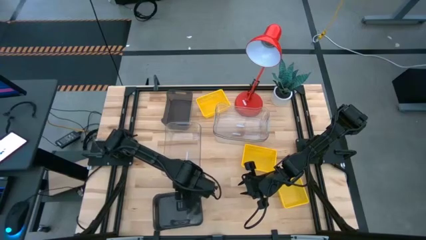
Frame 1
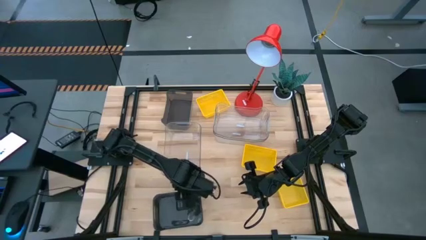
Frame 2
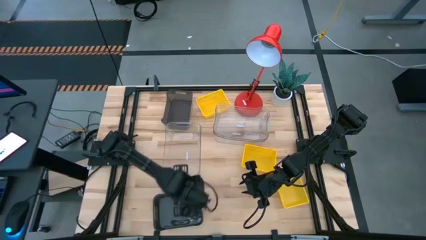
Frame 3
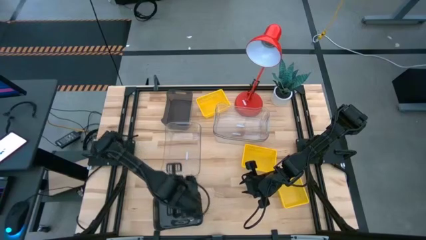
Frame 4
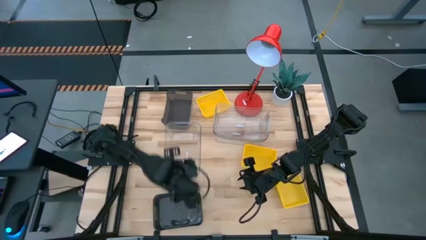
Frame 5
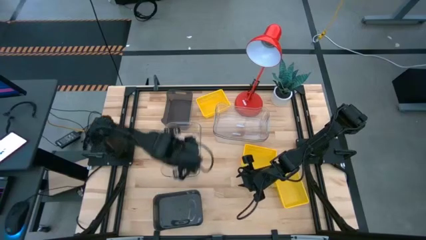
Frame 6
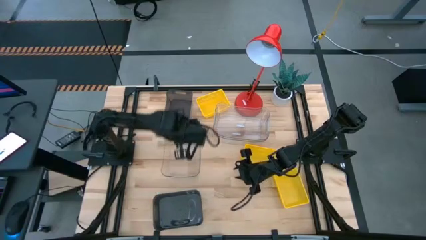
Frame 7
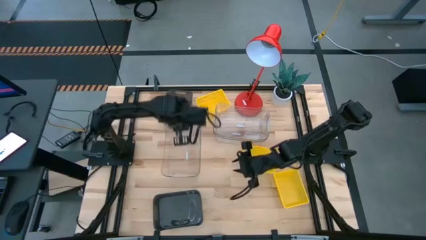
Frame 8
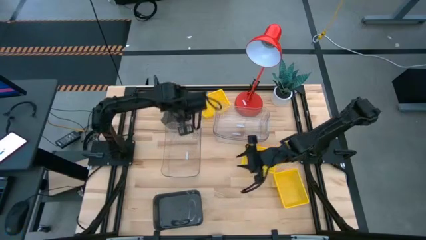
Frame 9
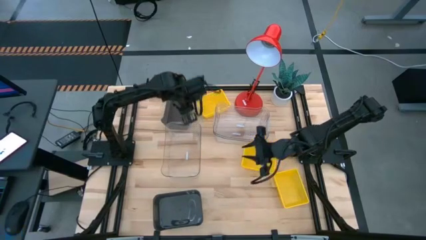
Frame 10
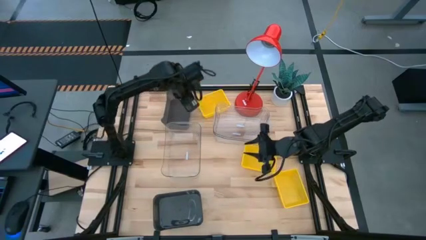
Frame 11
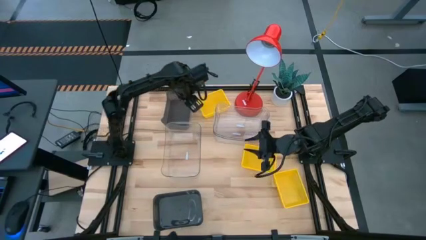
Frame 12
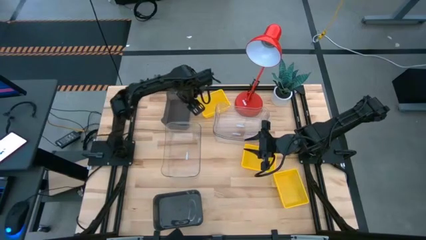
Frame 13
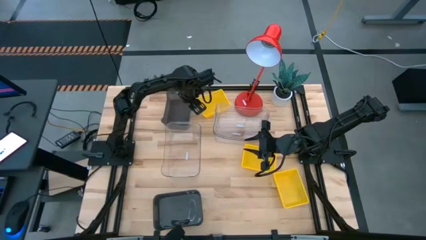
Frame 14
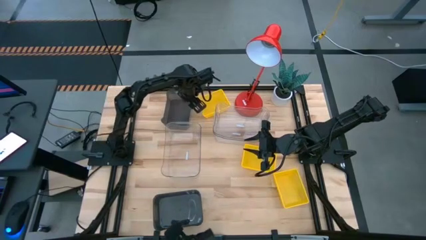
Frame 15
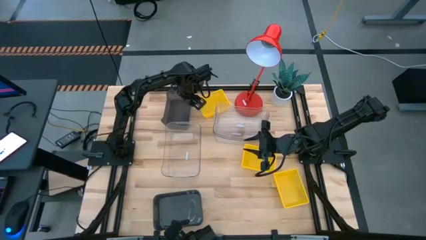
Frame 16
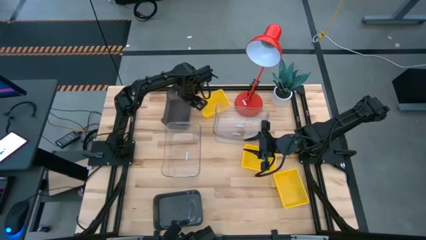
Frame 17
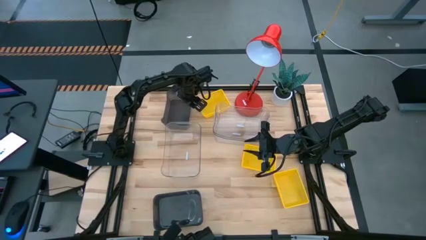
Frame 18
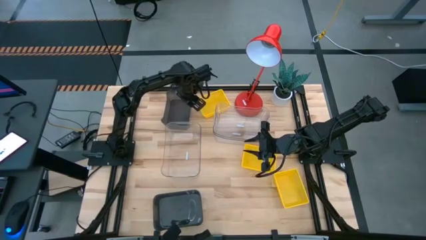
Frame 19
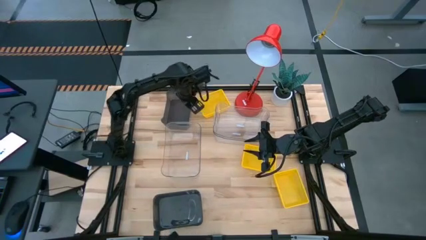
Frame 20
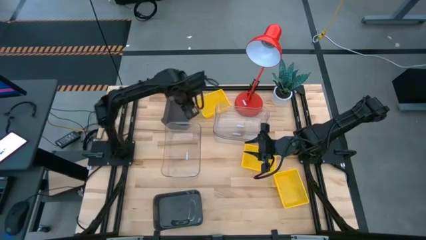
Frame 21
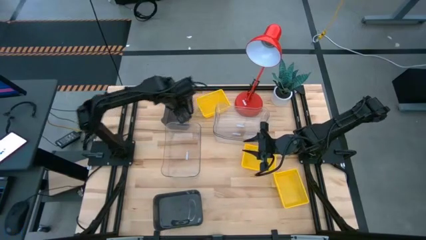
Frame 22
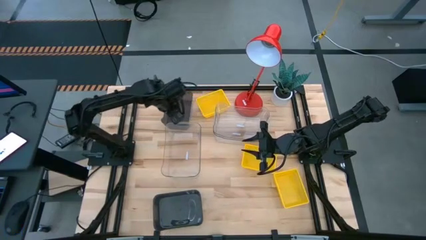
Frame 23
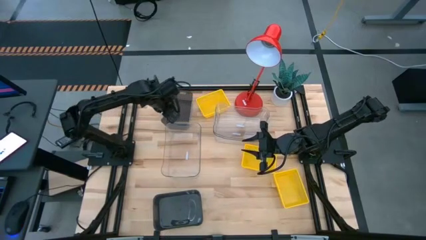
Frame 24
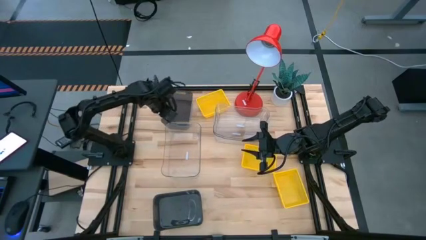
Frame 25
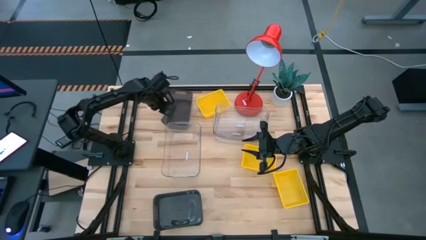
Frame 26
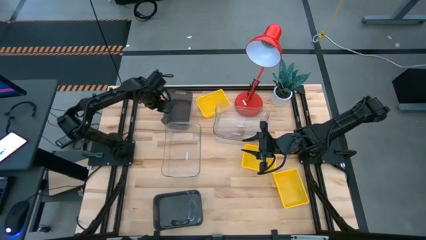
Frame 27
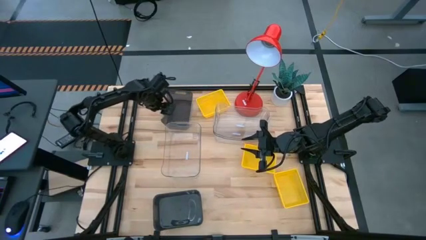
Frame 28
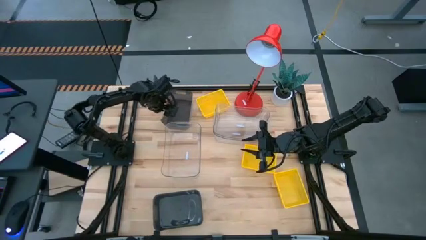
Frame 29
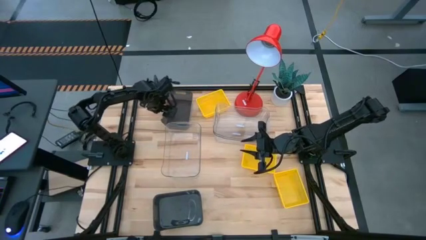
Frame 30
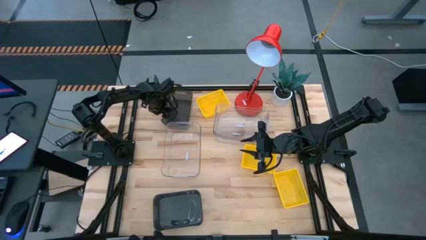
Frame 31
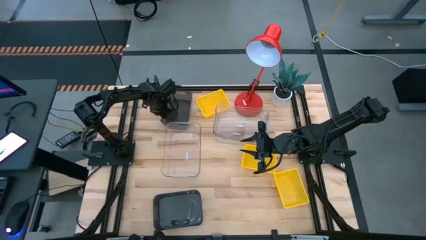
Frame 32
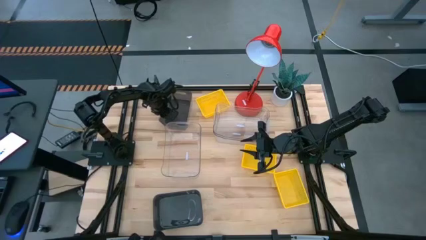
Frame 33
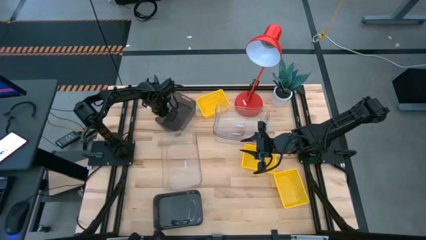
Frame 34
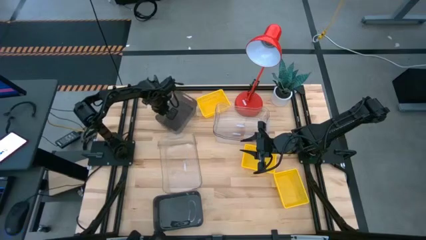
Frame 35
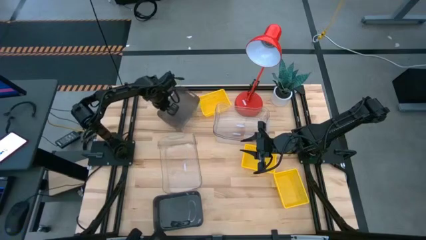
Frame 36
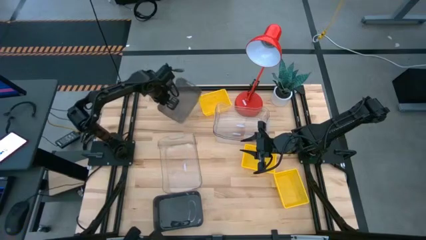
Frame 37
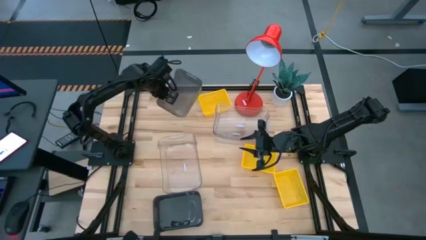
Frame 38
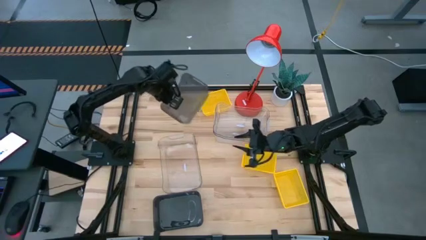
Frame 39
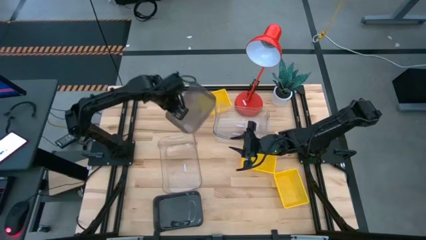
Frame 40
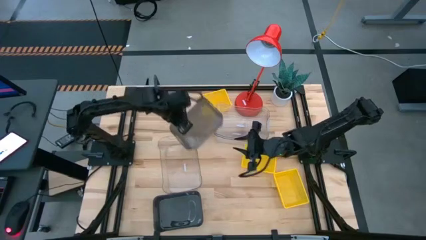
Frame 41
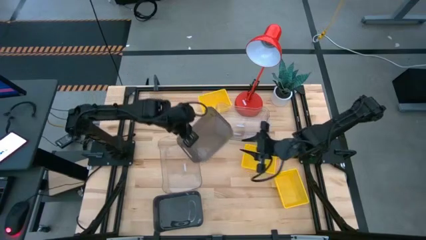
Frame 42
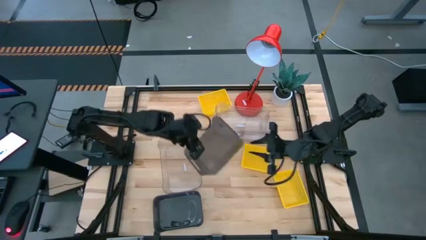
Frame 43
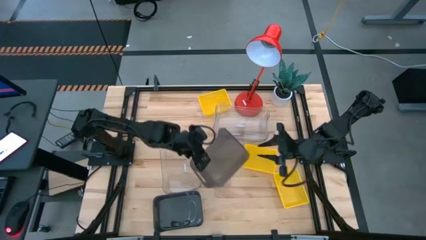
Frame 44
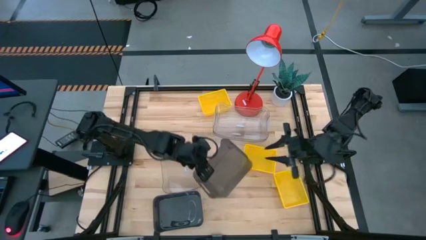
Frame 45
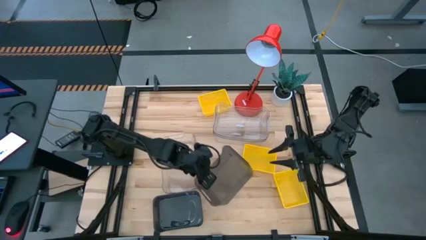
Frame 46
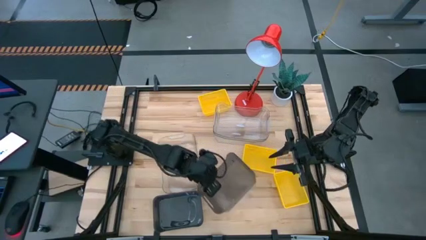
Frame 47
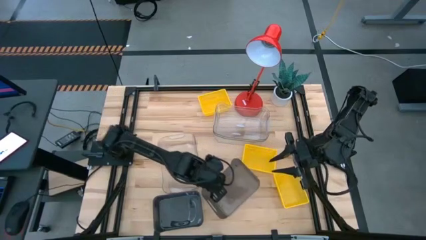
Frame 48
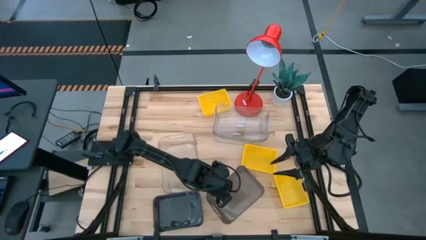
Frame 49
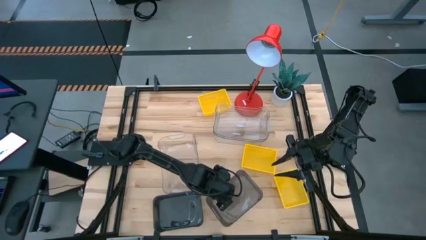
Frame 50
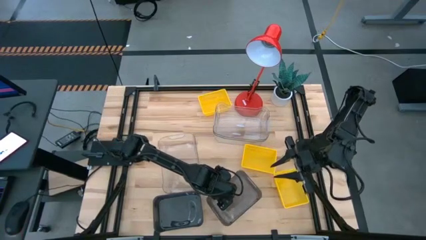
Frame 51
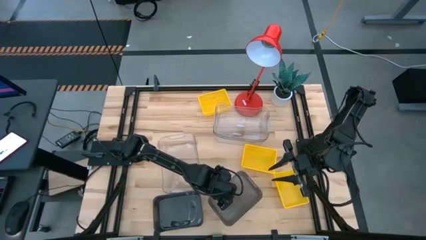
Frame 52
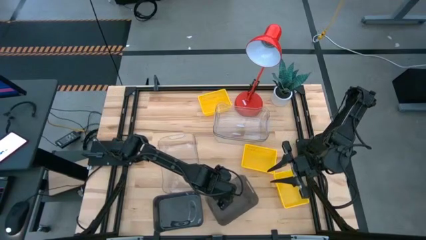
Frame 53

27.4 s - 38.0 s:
Move the top black bin to the bottom of the table

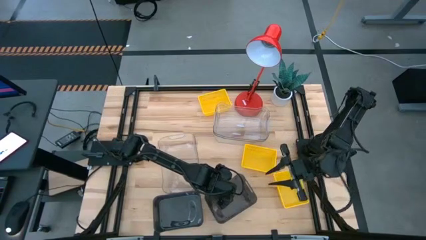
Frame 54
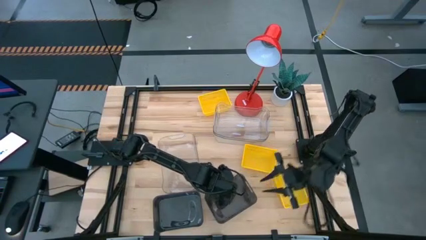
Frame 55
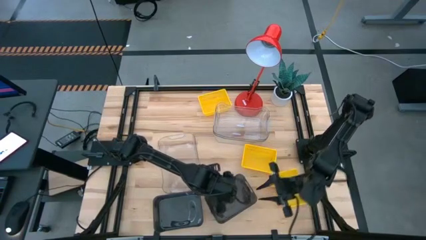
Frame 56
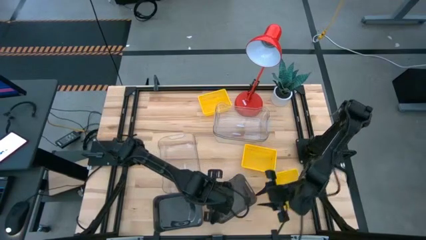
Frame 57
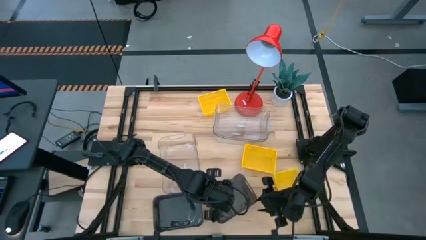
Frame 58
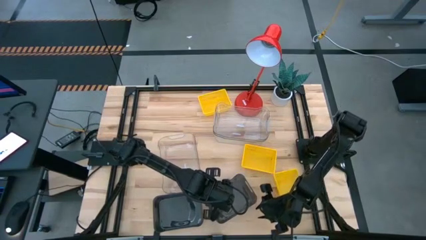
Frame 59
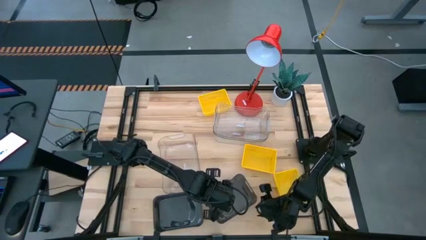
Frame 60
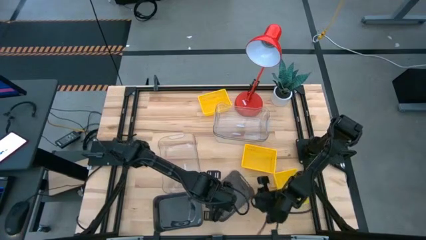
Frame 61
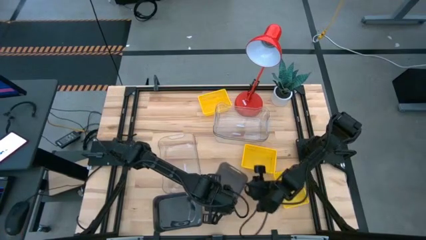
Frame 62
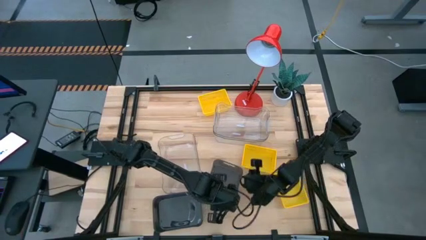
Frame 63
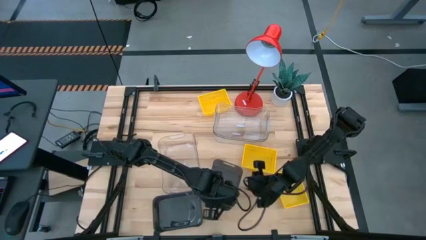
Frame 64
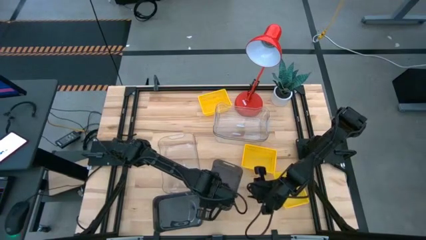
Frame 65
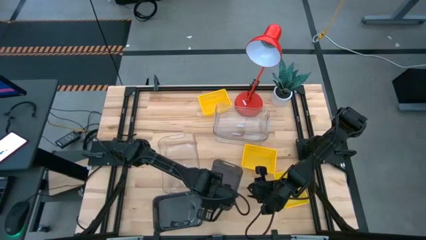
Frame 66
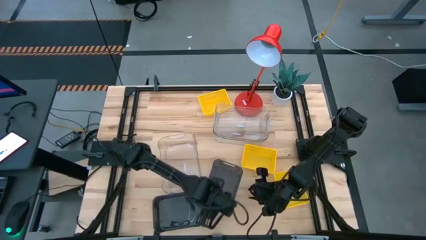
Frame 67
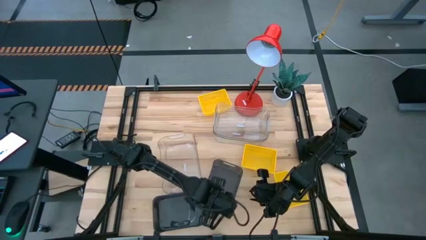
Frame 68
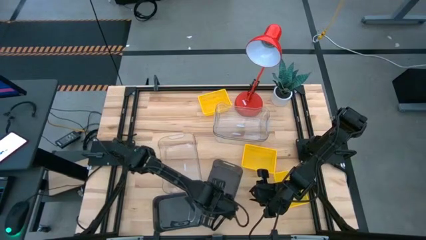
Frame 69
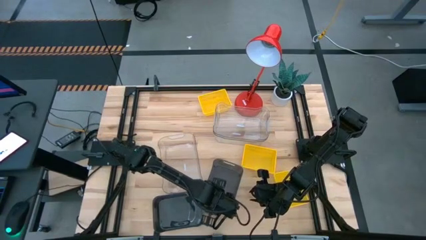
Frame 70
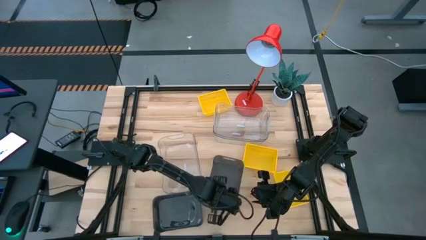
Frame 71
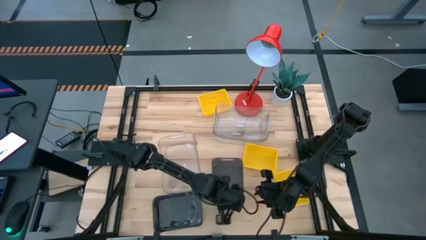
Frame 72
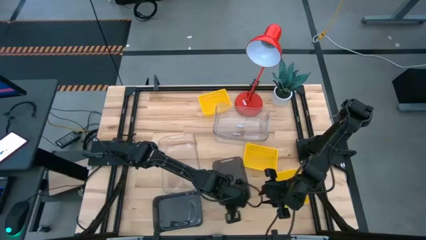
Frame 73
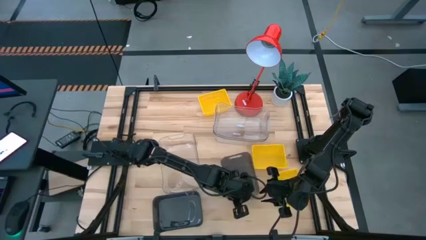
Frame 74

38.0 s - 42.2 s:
Stack the black bin on the left black bin
